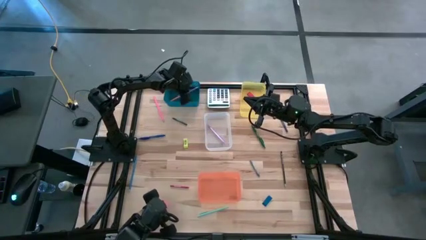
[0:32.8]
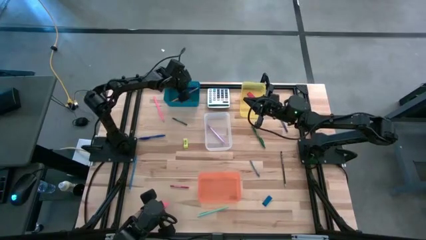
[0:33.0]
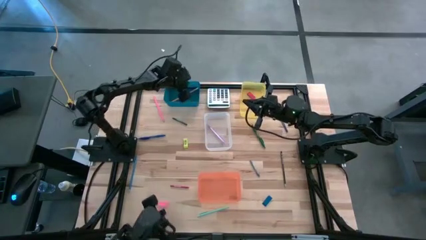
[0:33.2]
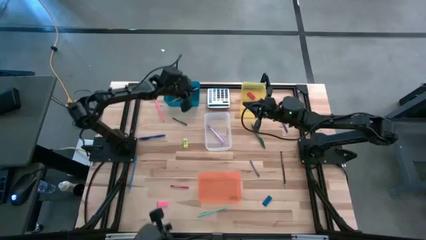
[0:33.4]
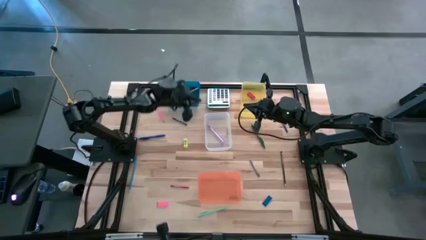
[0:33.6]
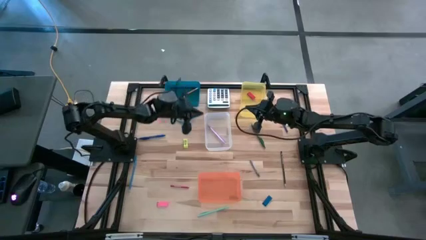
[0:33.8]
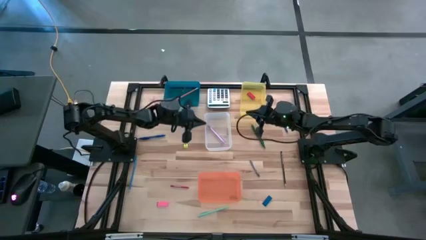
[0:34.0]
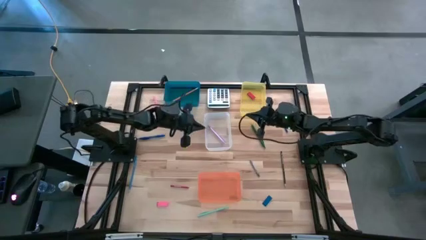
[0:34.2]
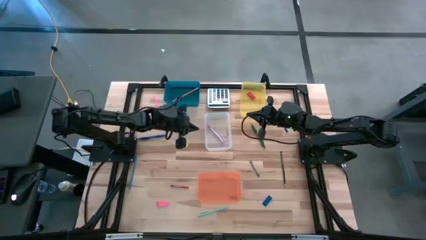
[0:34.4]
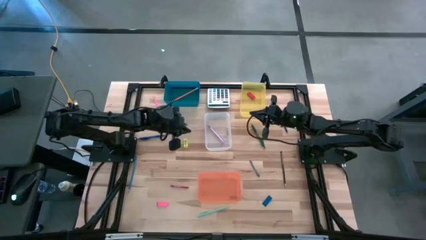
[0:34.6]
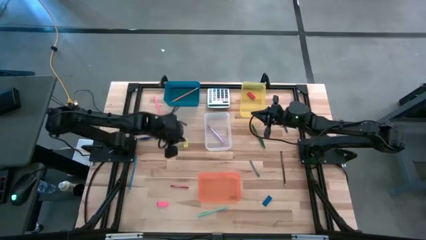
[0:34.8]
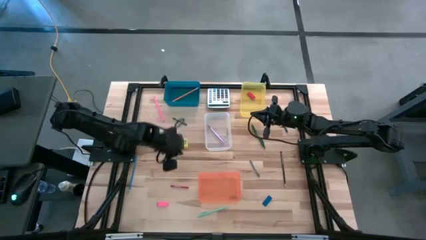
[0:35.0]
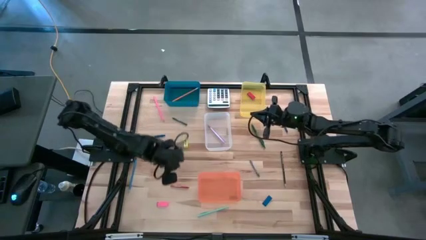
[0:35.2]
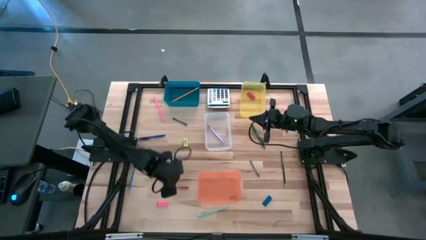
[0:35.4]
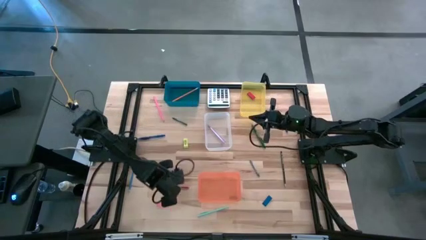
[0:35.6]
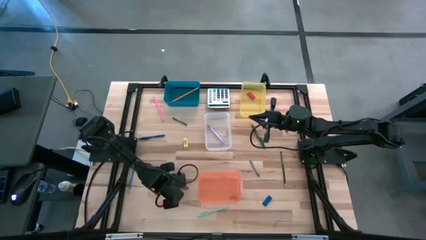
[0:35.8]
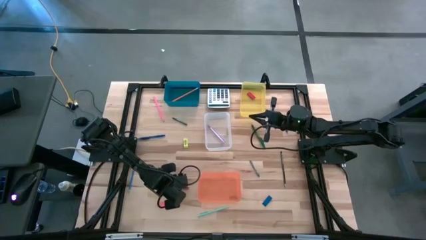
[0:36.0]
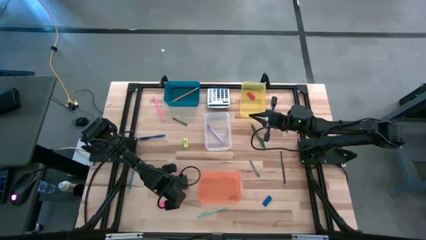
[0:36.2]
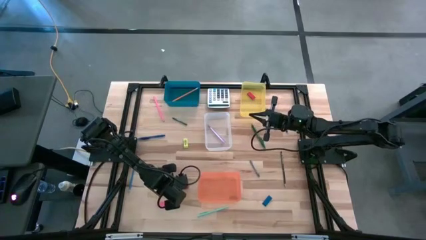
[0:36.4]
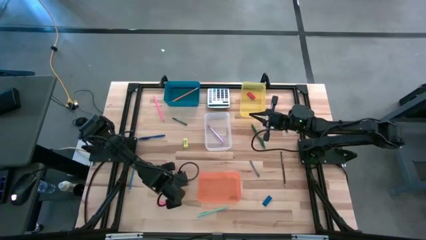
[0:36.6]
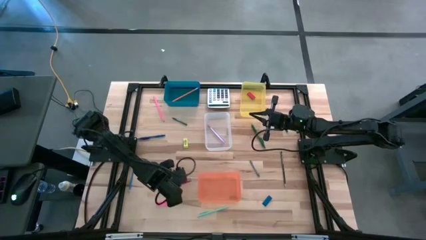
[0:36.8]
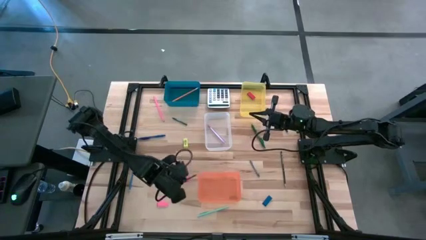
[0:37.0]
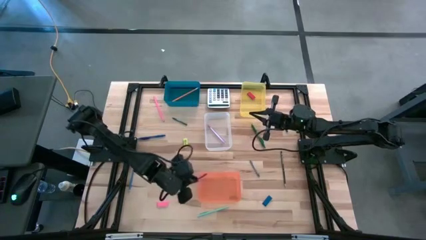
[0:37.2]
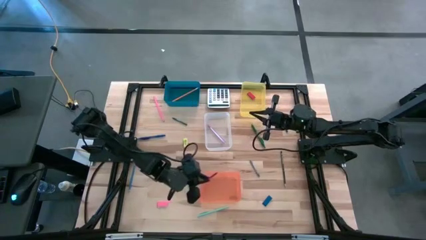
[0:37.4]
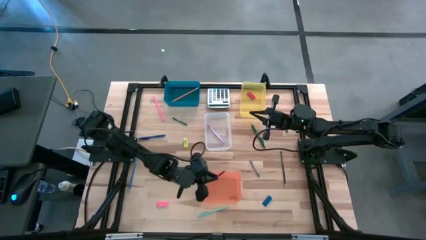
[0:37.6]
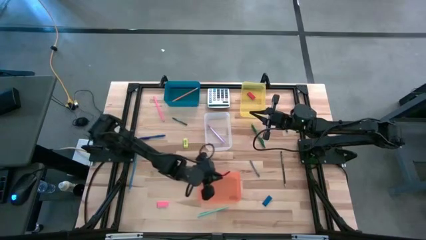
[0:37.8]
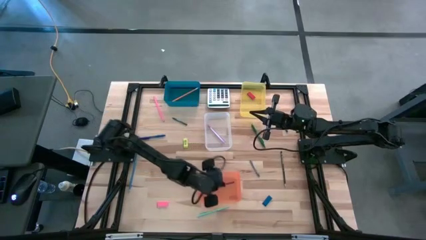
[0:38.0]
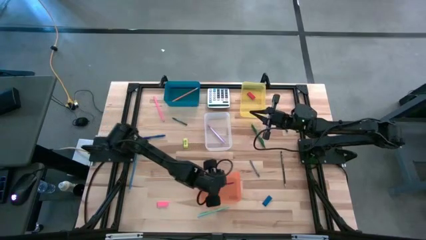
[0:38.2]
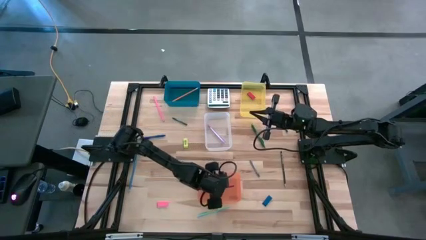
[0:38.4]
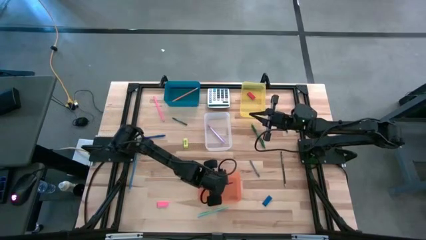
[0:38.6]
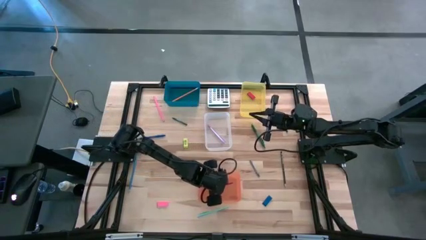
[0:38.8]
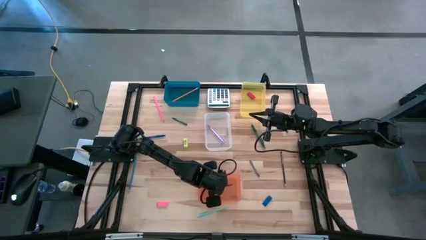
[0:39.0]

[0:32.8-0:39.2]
Task: Sort crayons/erasers/pens/pencils in bins
Put the red crayon into the orange bin

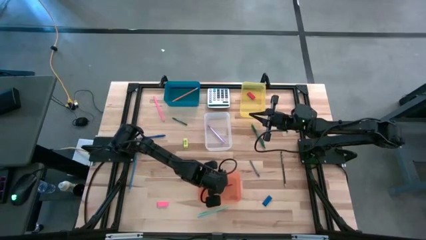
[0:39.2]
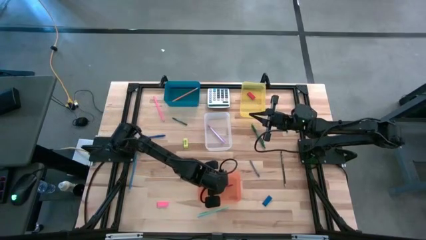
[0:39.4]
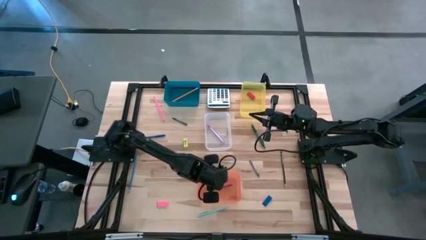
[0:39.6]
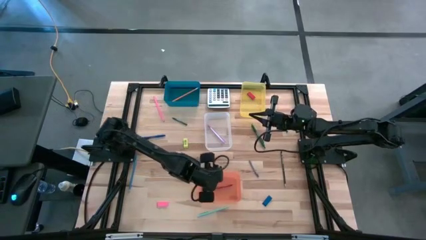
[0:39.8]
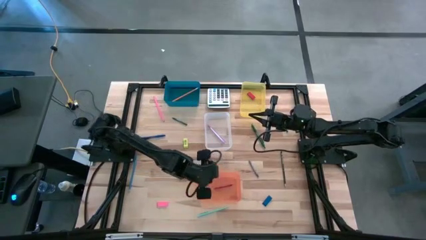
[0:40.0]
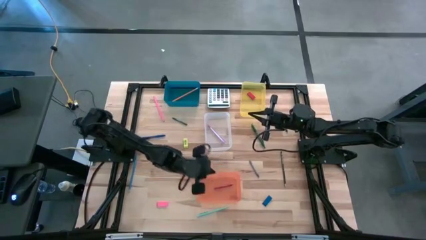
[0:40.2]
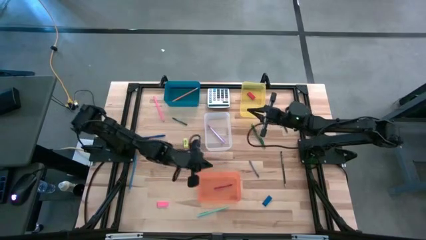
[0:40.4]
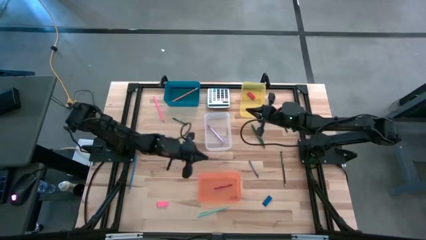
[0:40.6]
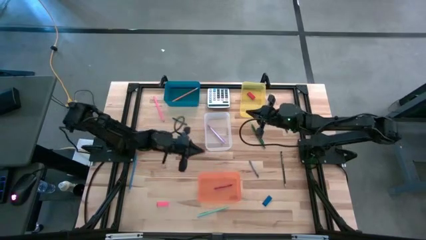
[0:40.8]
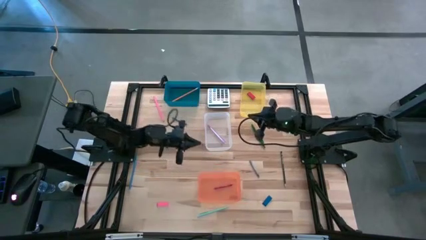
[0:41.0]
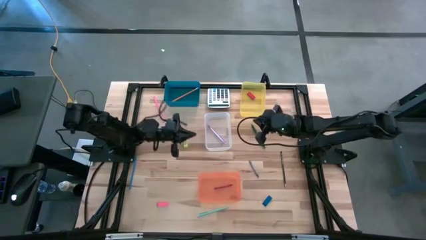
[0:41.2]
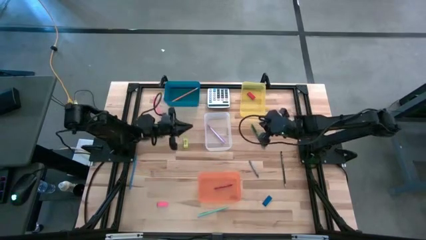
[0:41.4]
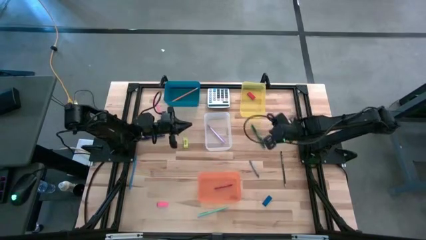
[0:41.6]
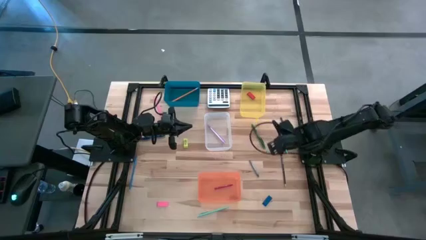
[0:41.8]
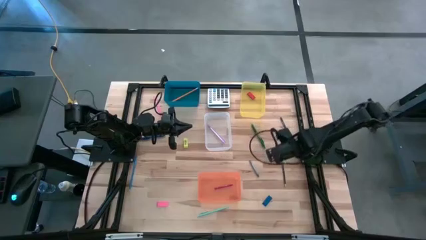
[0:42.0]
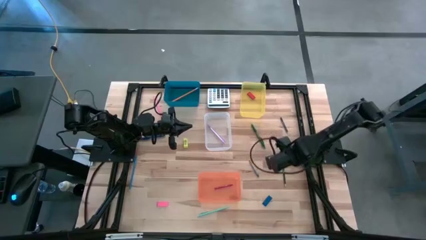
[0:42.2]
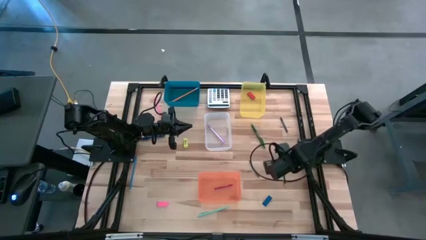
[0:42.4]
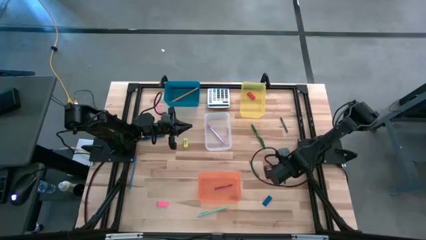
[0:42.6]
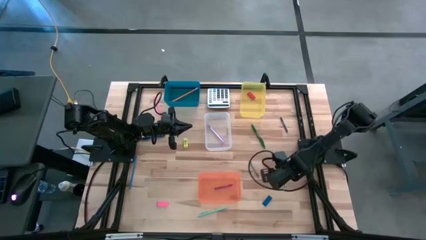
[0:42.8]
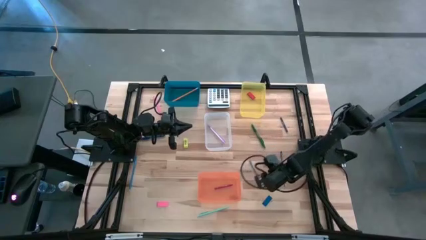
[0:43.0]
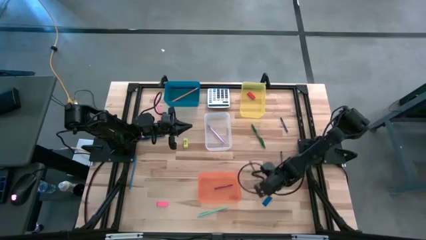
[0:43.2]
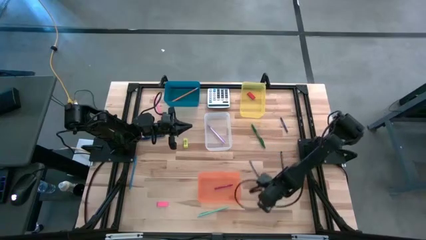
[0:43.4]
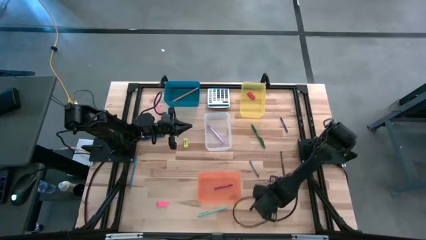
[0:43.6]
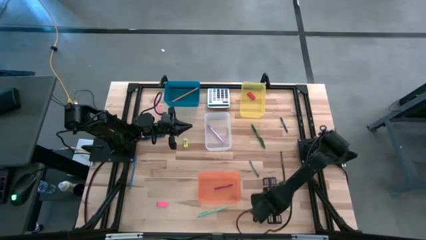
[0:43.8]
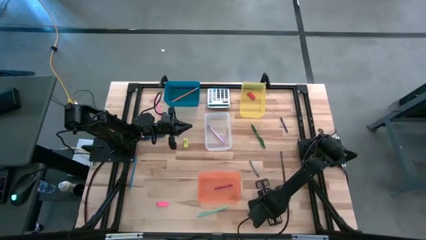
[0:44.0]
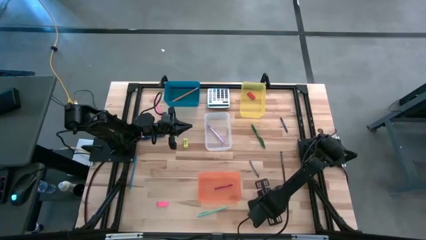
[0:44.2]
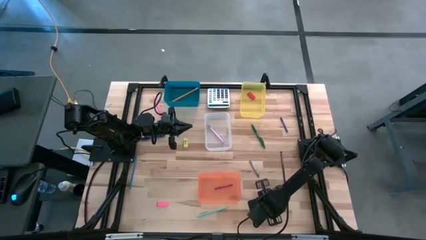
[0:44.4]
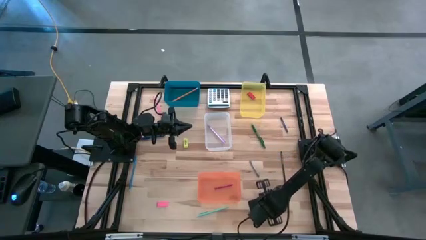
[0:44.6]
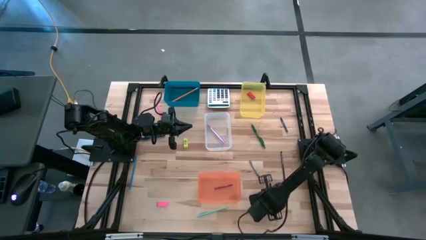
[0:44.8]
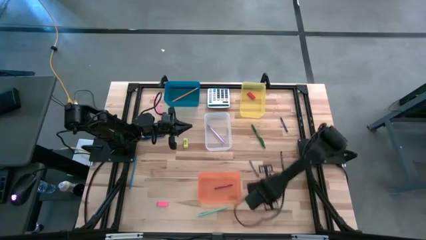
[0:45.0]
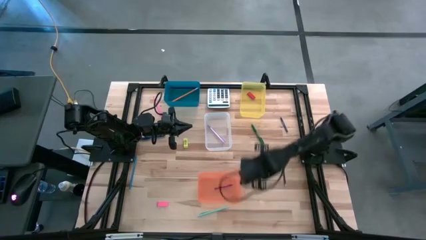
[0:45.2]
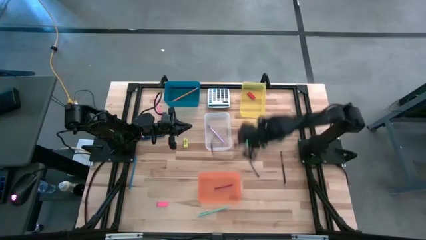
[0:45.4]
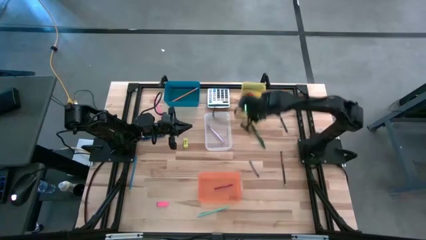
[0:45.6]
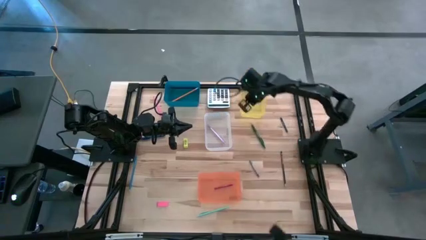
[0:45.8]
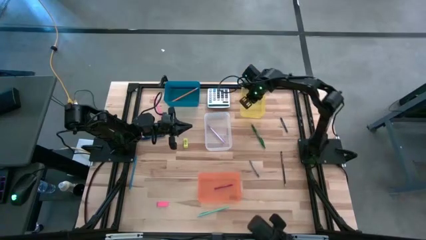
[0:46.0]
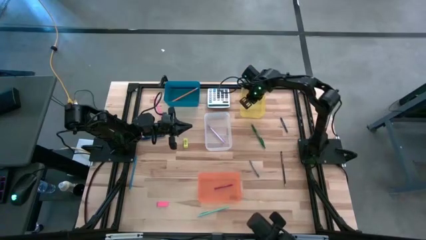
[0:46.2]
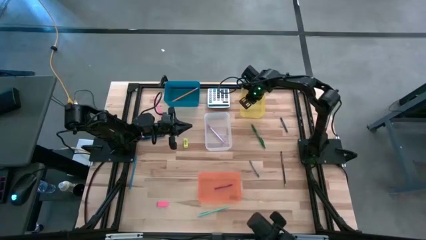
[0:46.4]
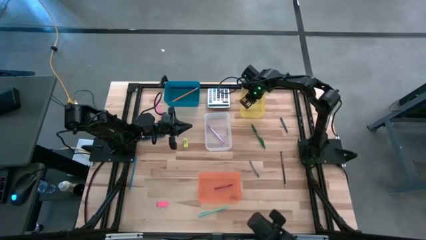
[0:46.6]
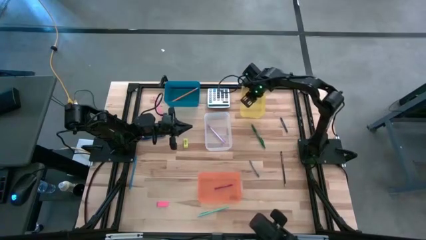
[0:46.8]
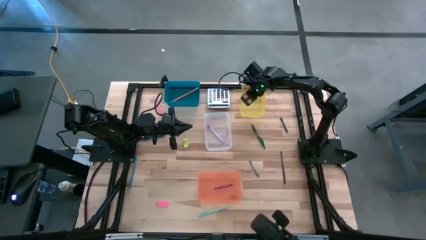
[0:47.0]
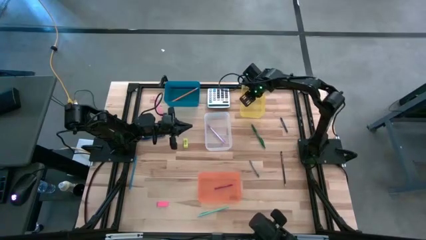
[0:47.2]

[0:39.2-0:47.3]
Put the blue eraser into the yellow bin
